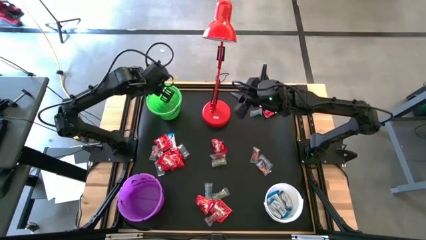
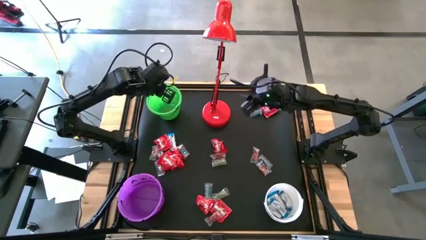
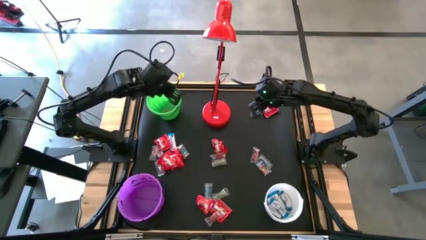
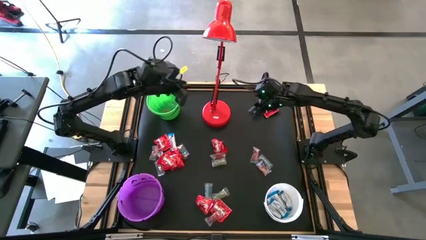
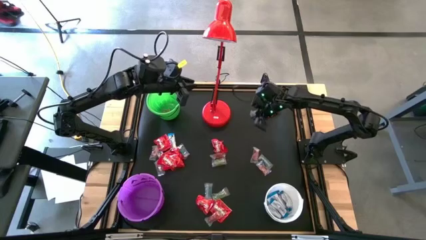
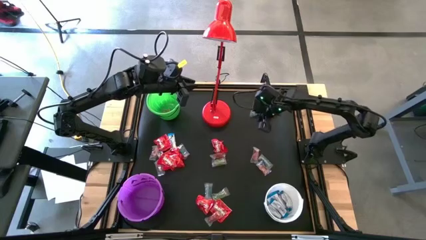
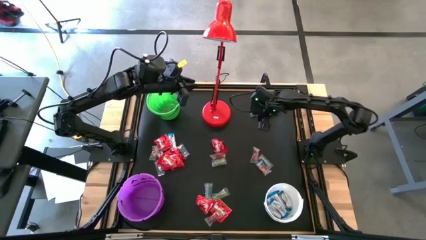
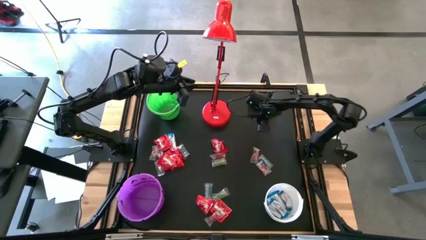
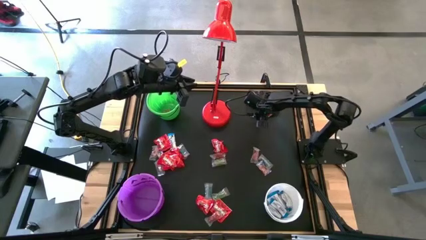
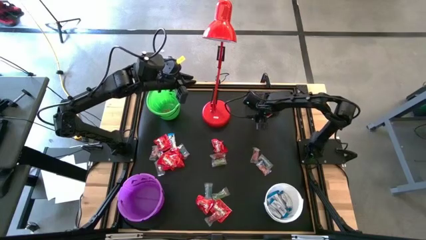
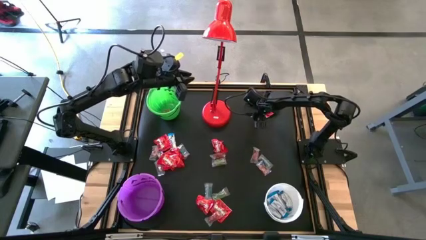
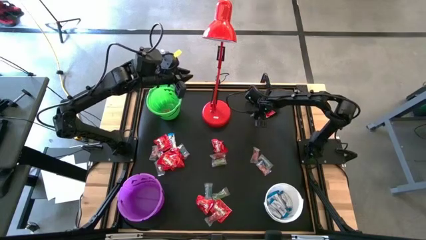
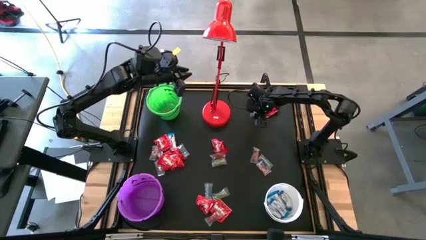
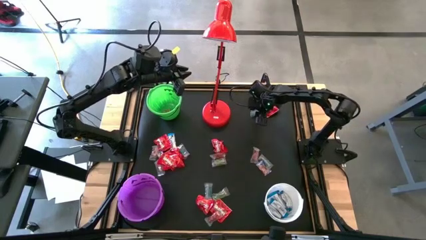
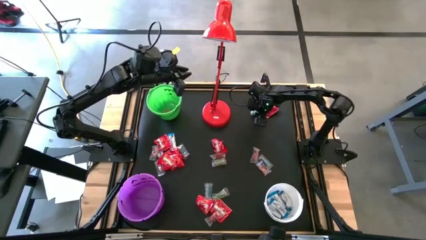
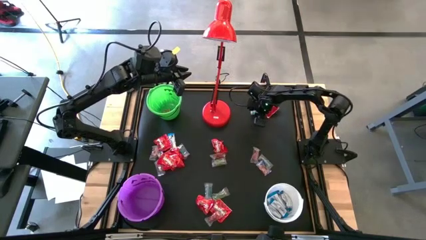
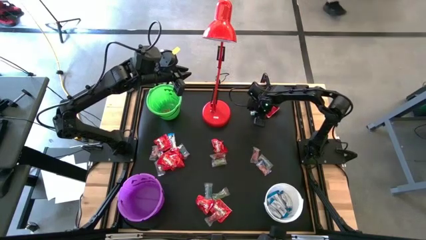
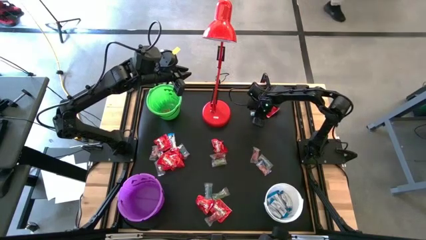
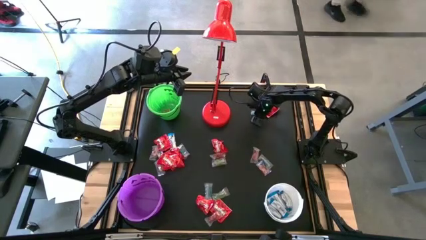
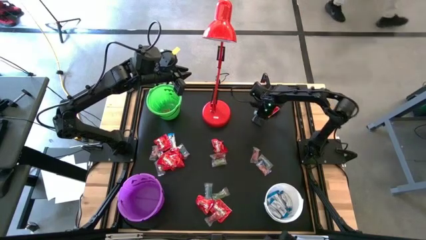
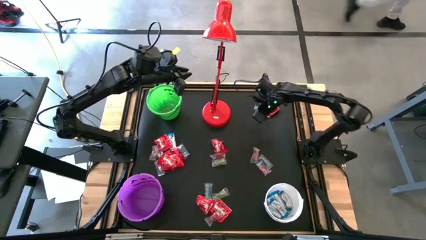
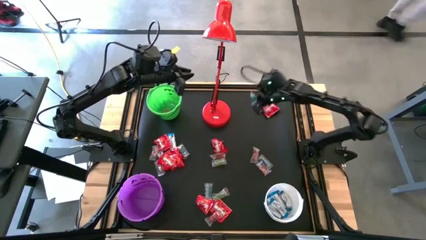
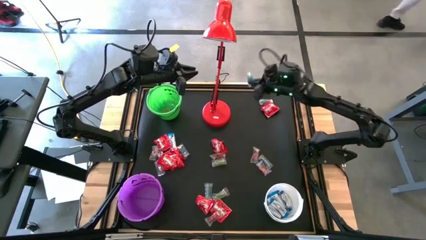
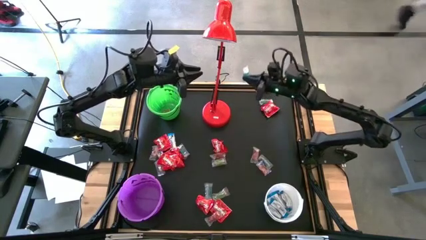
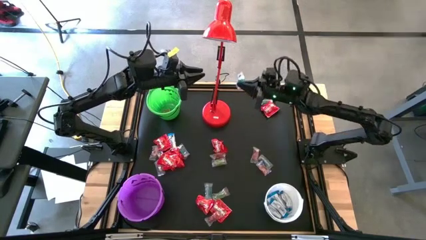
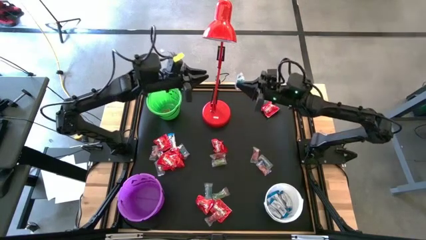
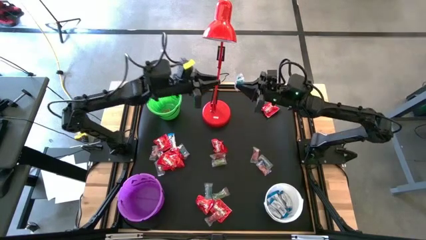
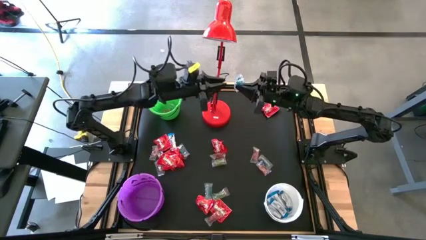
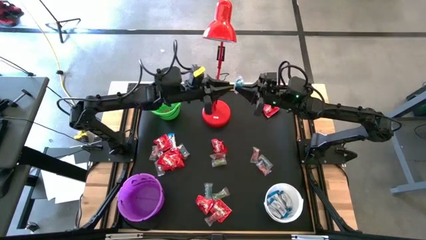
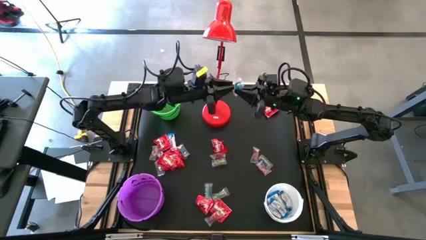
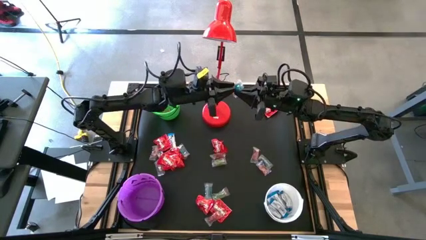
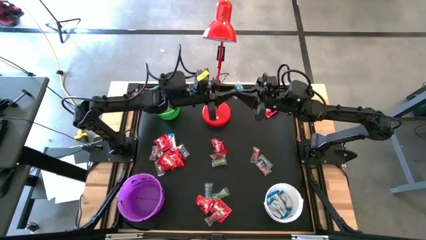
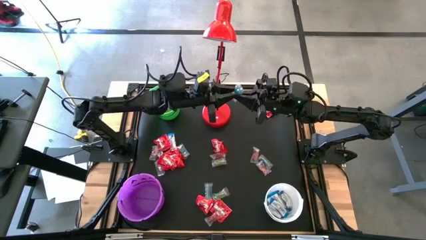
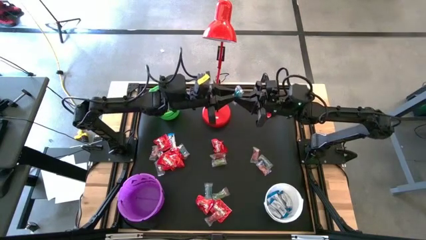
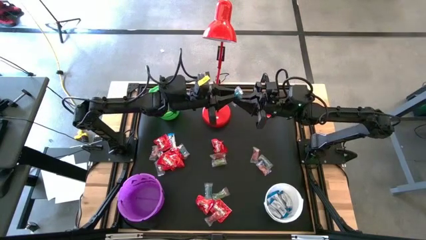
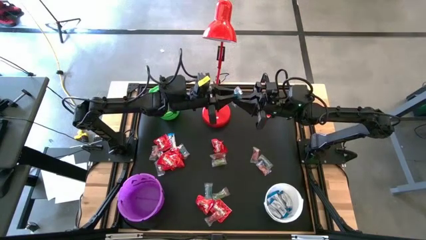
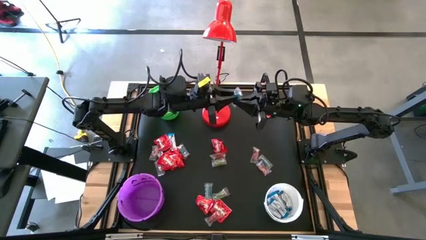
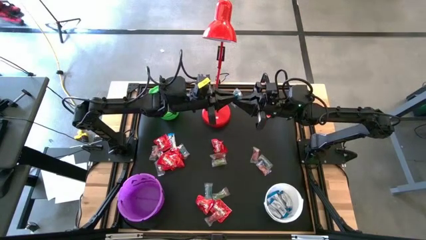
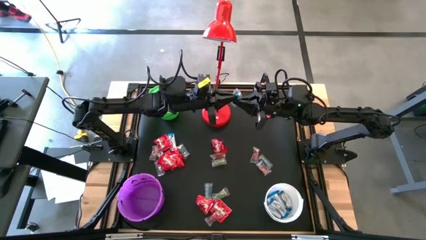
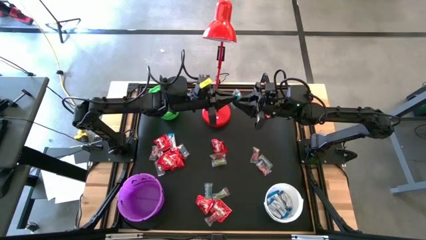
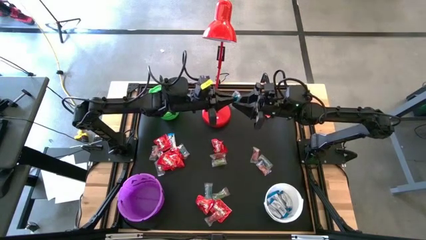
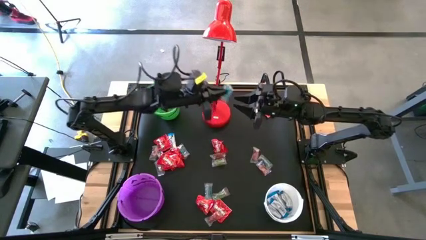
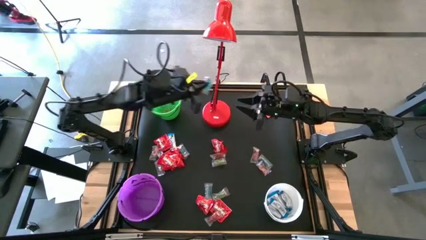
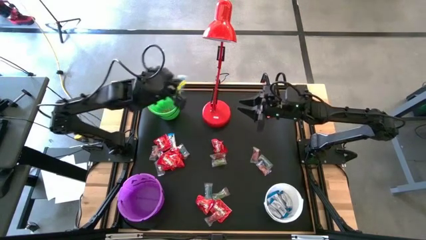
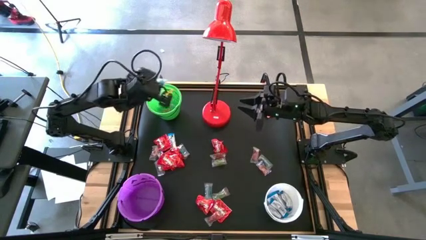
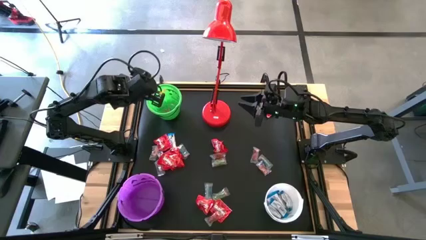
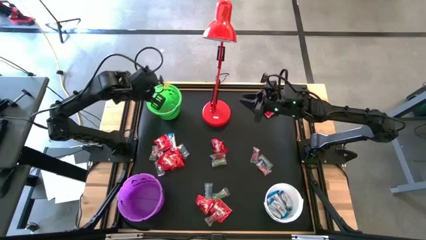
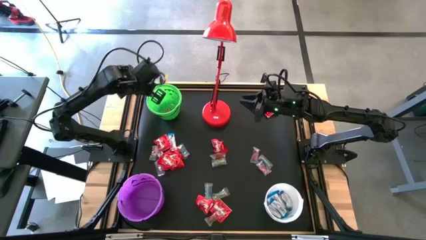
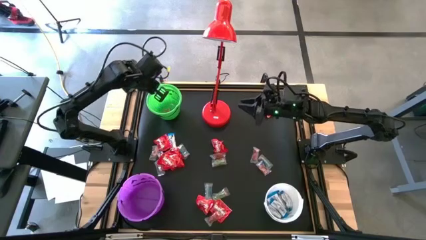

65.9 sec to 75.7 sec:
Task: Sort candy
Put the blue gummy into the green bucket

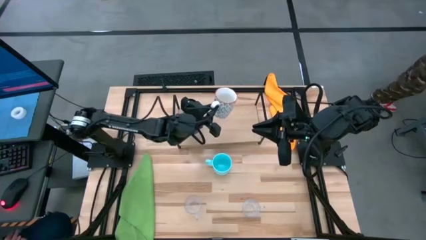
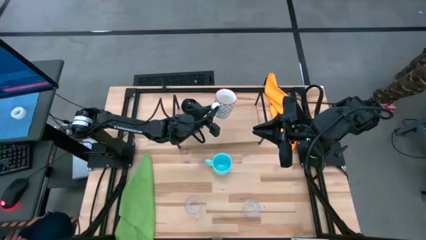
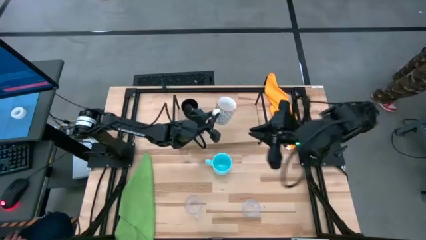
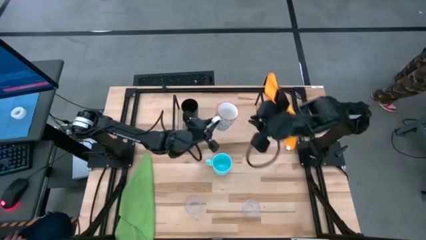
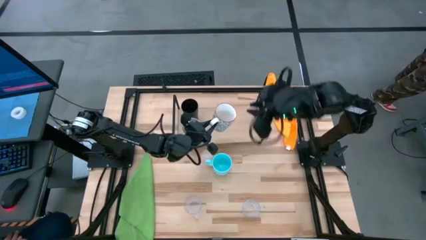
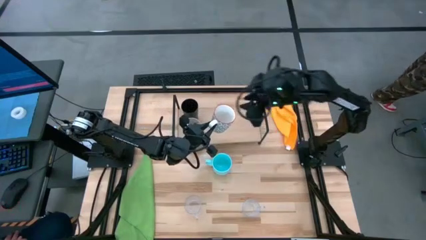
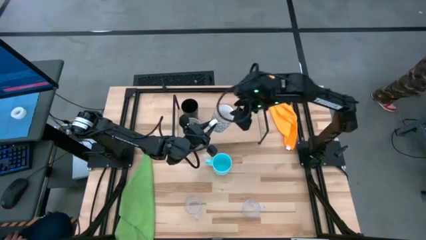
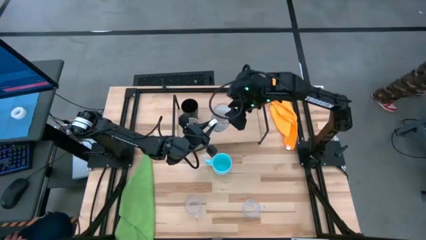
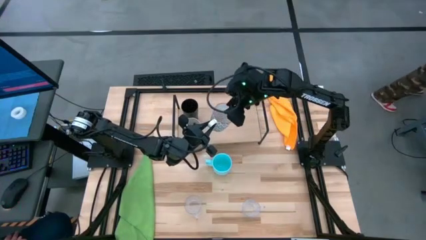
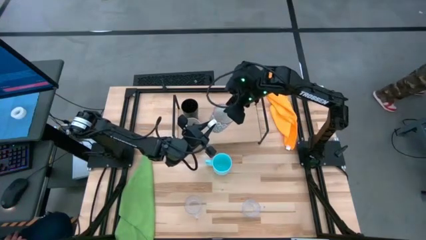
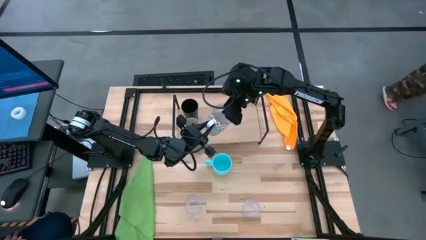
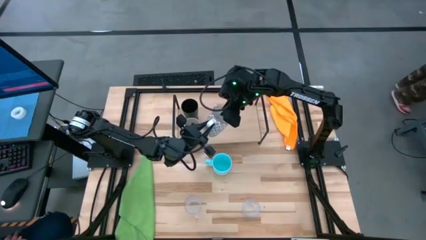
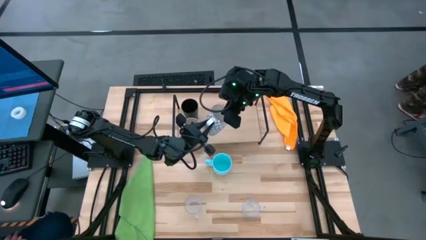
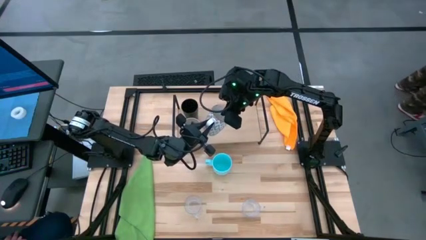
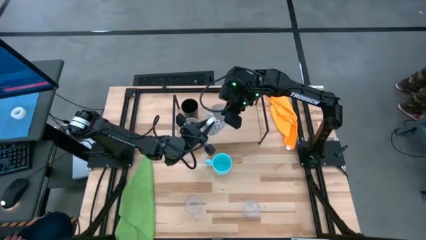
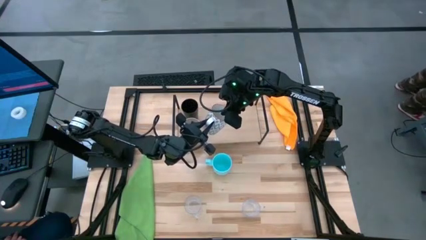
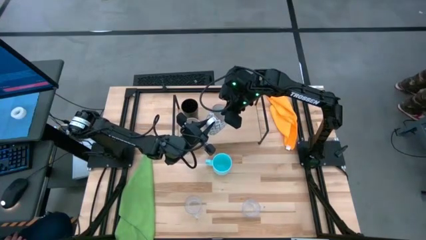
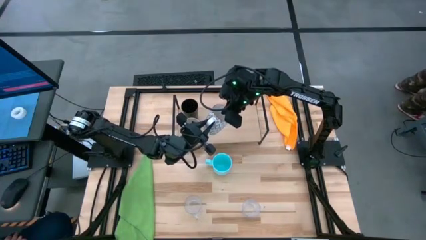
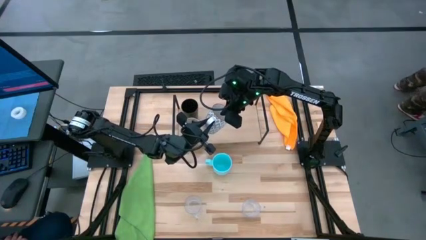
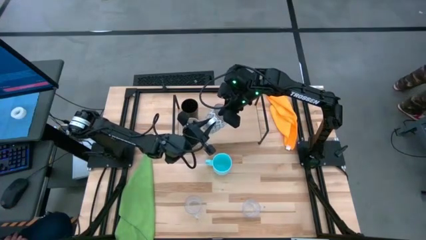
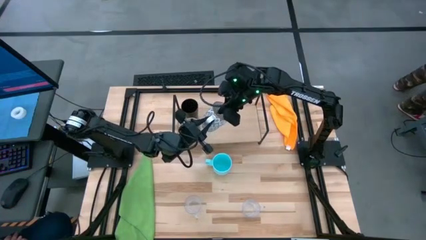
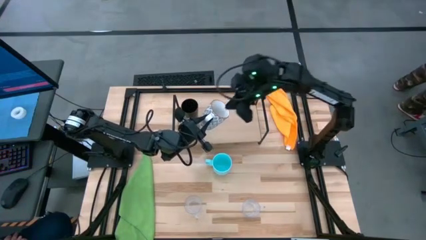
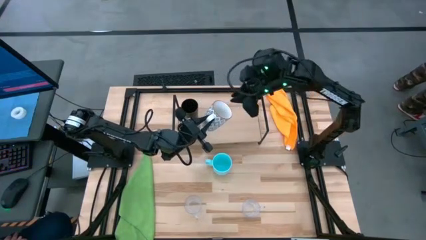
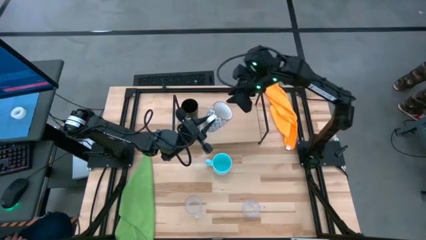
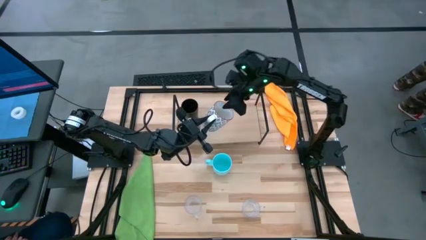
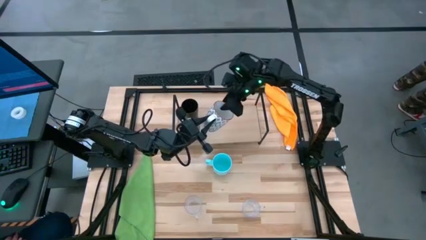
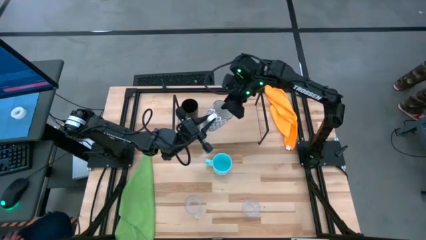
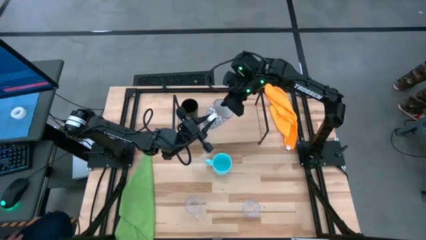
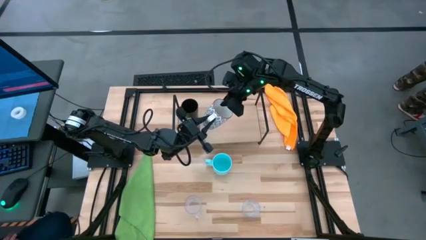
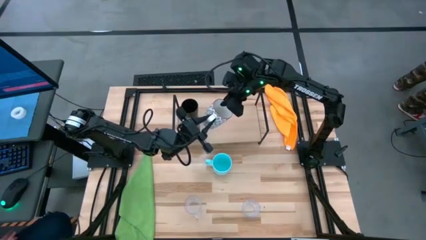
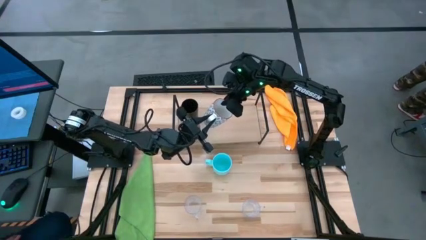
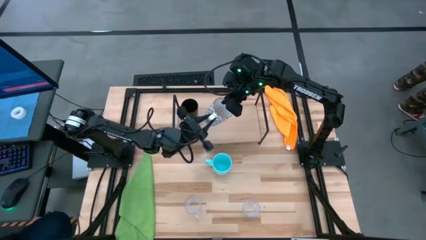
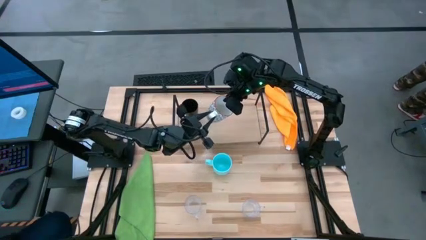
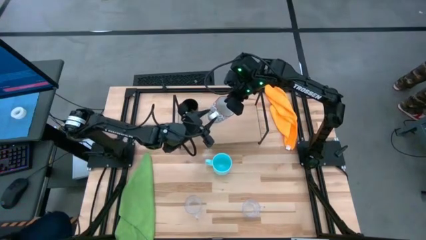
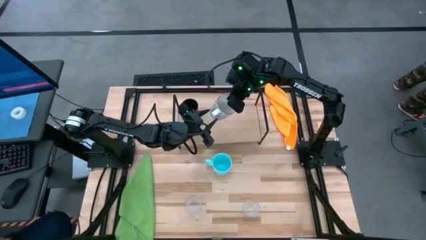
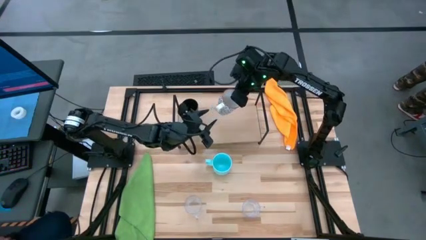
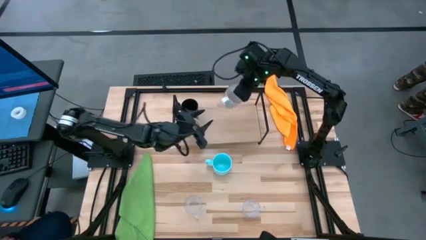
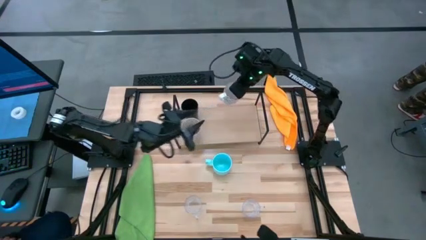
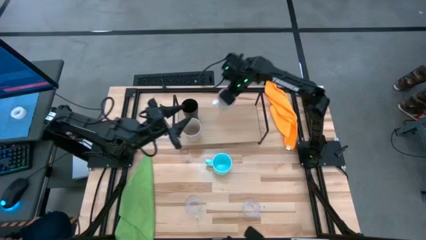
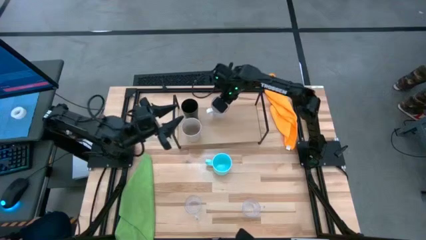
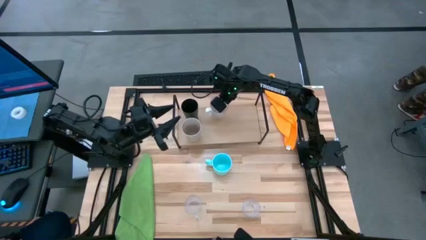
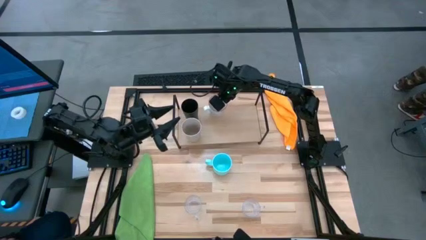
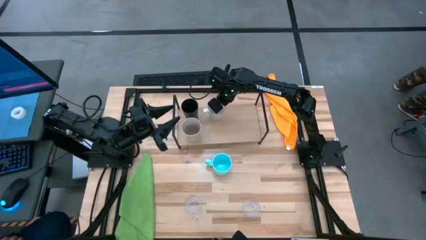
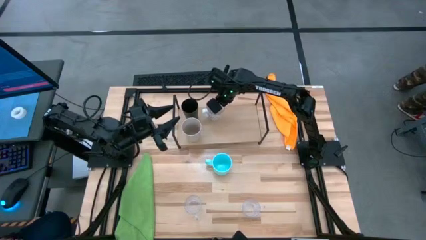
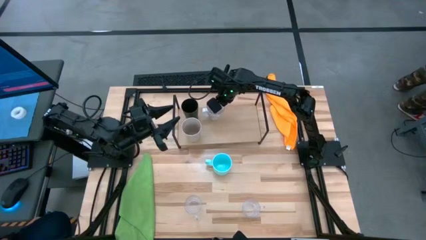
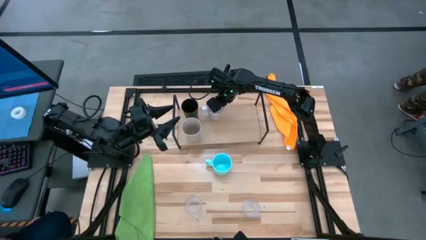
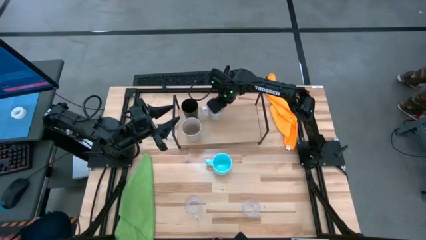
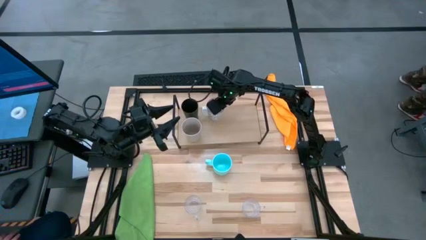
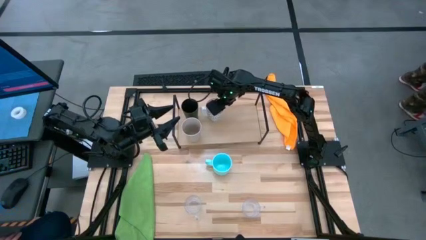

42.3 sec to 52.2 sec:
Task: Stack small to large cups/mugs on shelf
Put the white mug on the shelf
